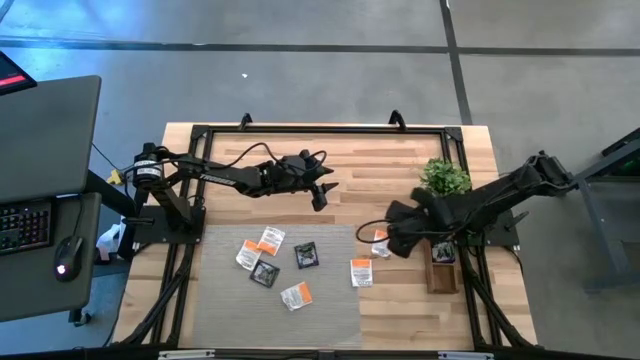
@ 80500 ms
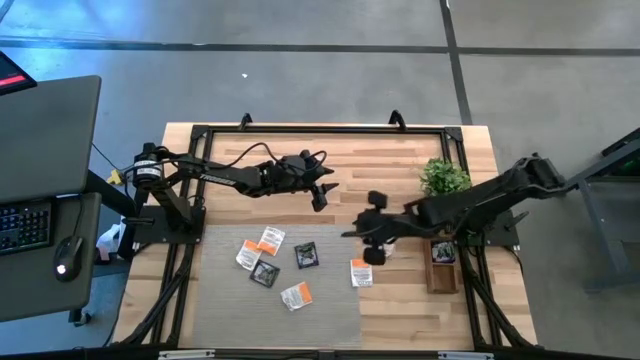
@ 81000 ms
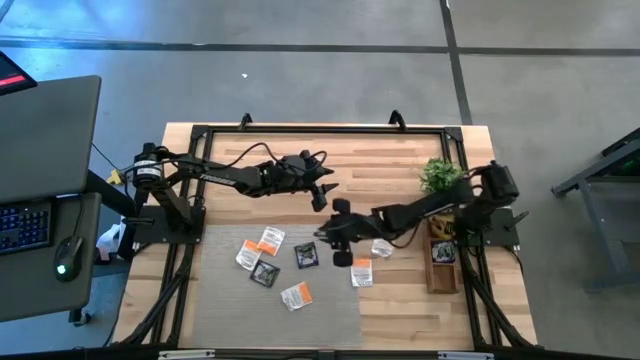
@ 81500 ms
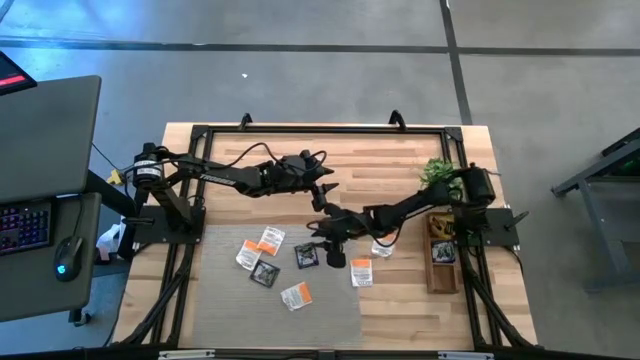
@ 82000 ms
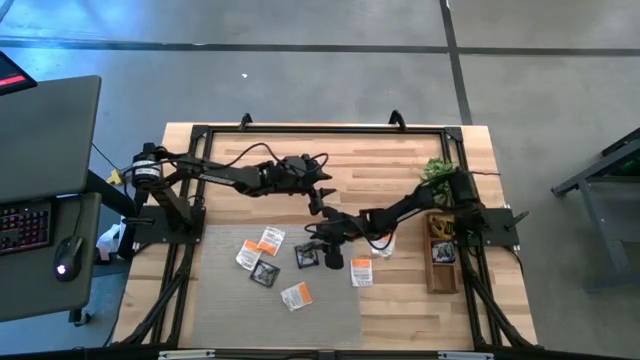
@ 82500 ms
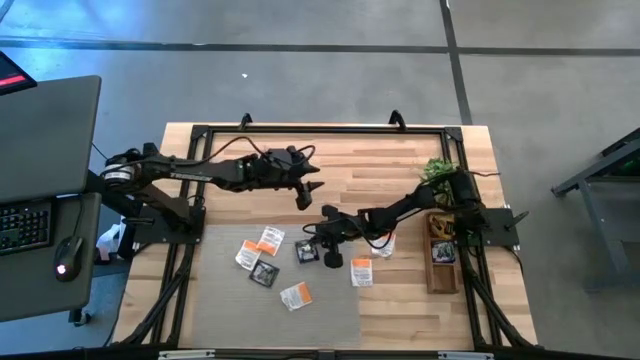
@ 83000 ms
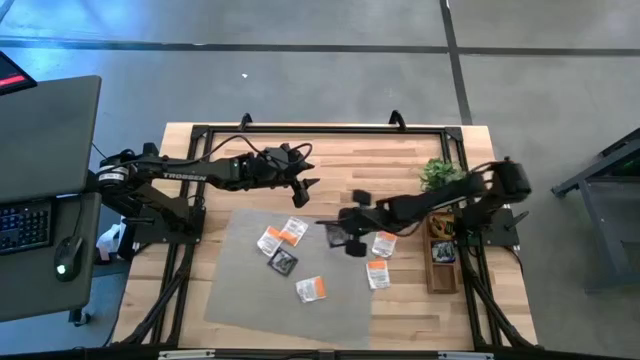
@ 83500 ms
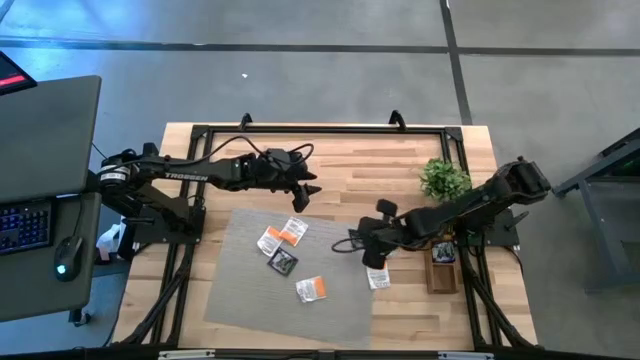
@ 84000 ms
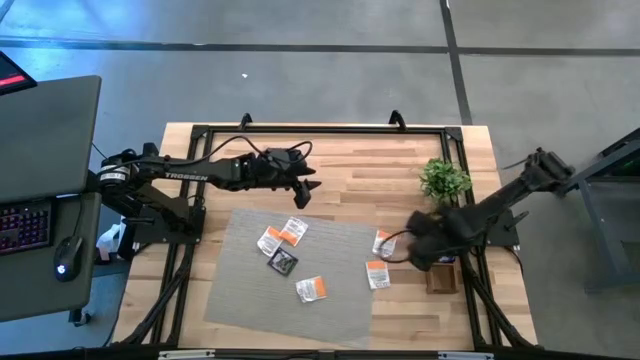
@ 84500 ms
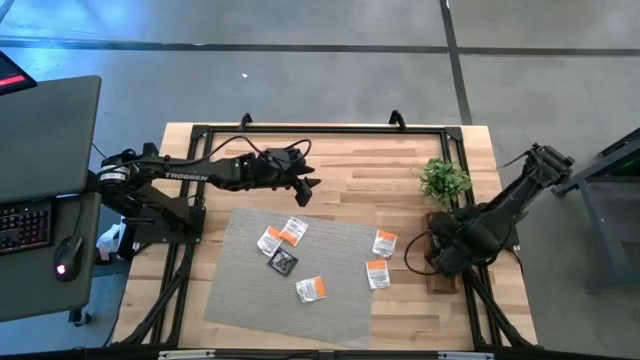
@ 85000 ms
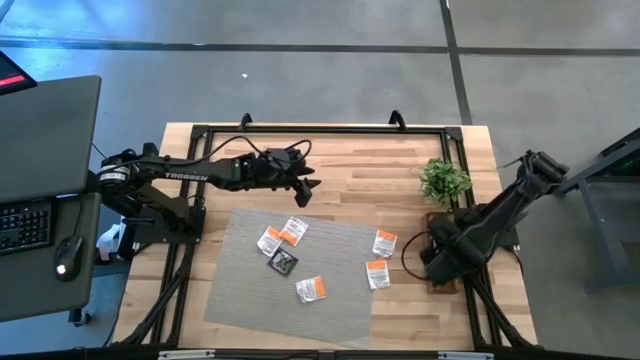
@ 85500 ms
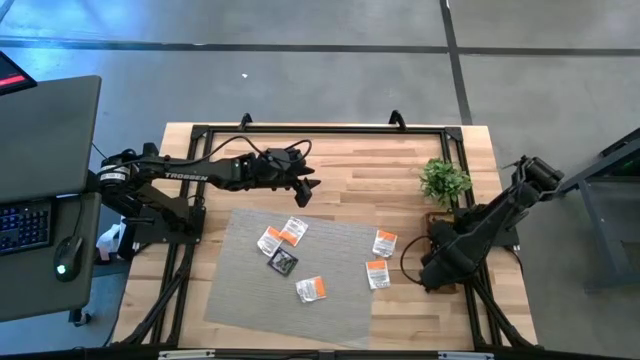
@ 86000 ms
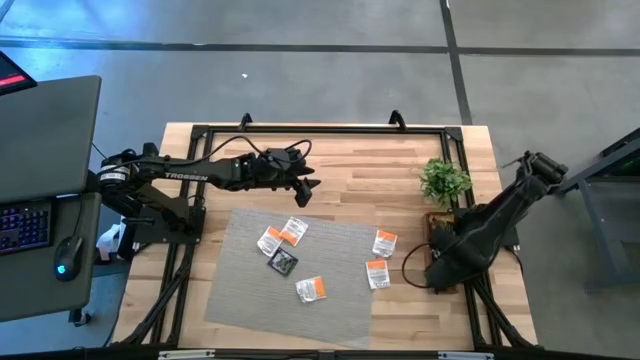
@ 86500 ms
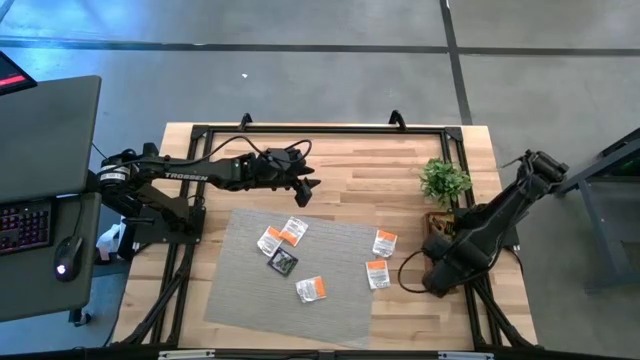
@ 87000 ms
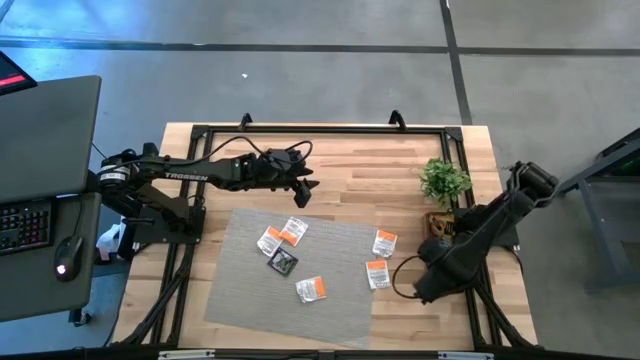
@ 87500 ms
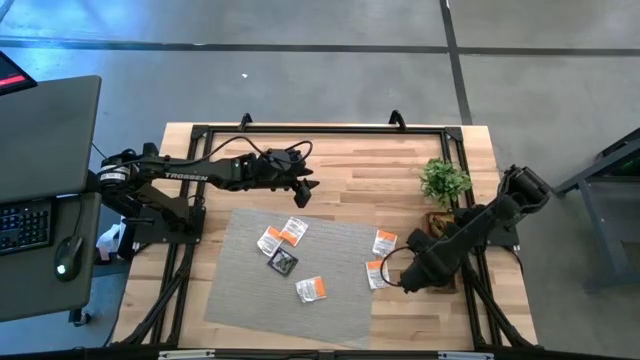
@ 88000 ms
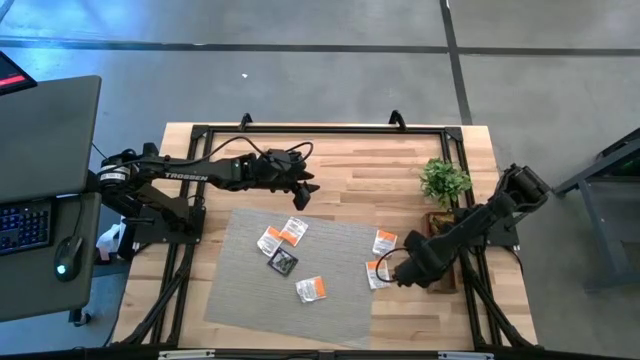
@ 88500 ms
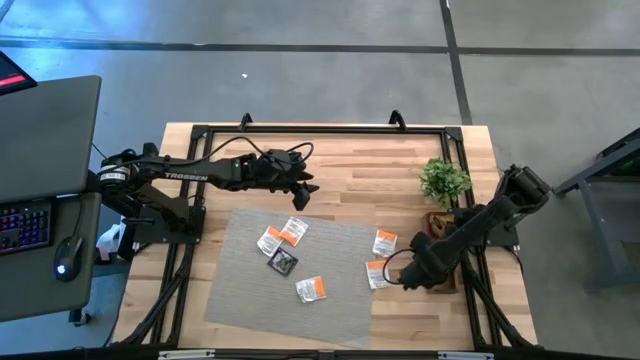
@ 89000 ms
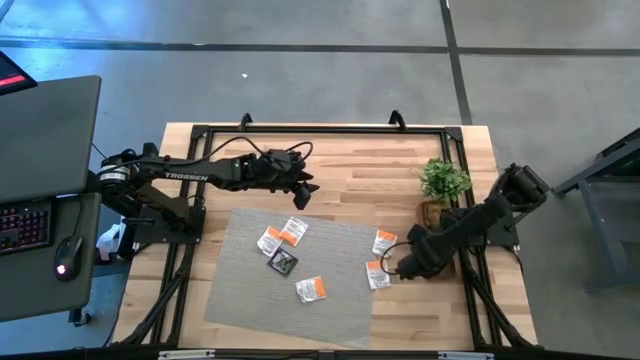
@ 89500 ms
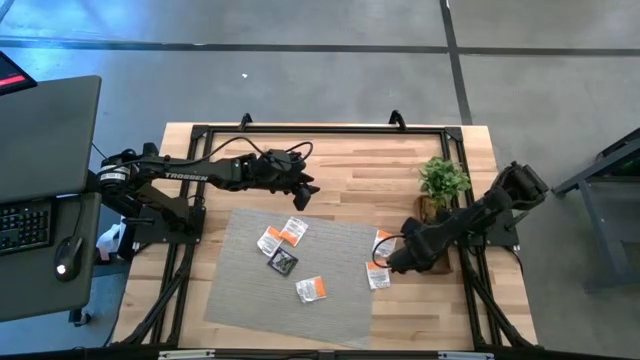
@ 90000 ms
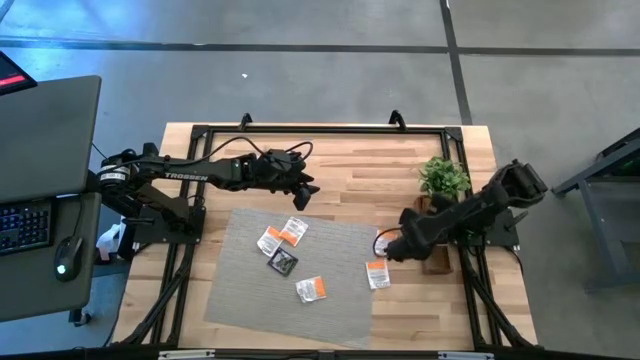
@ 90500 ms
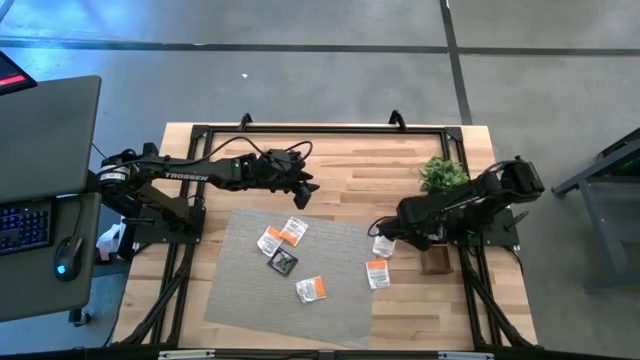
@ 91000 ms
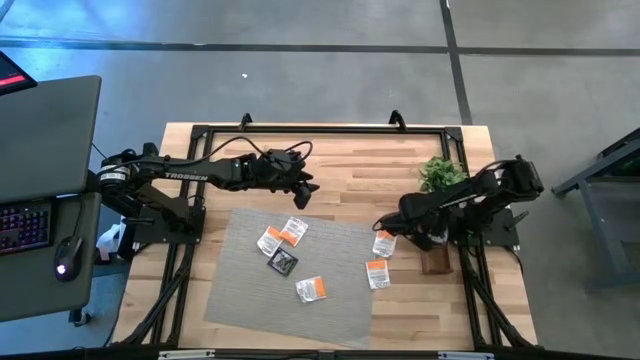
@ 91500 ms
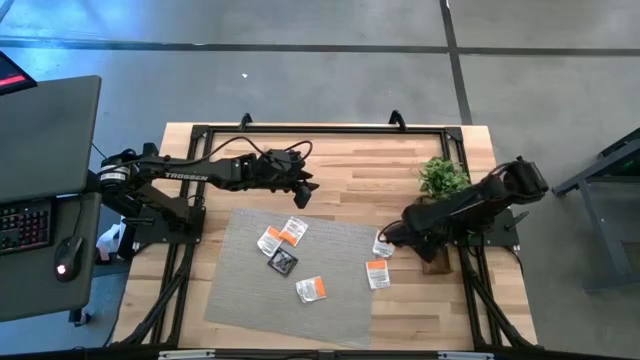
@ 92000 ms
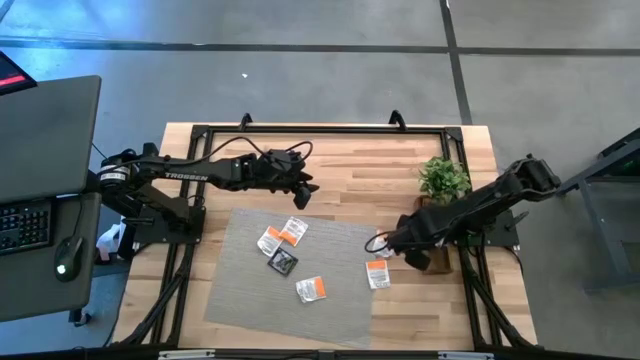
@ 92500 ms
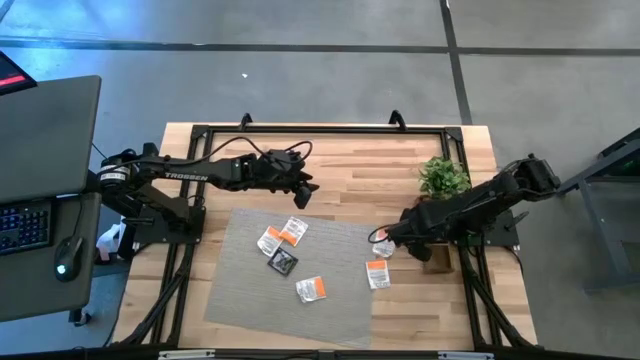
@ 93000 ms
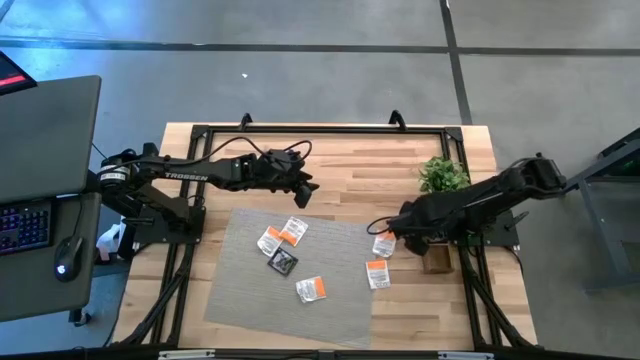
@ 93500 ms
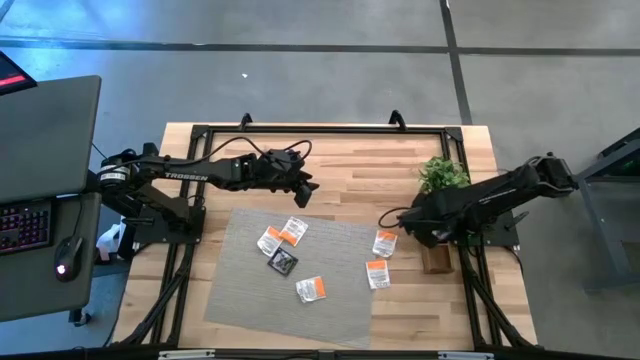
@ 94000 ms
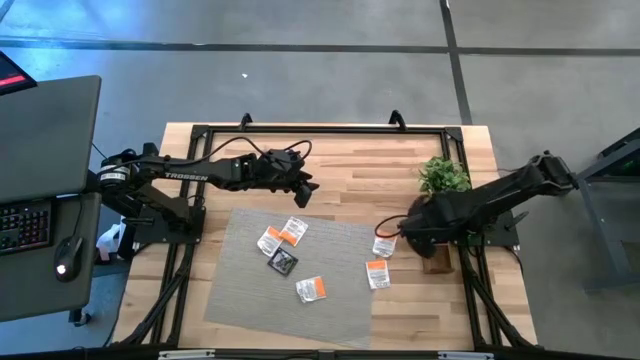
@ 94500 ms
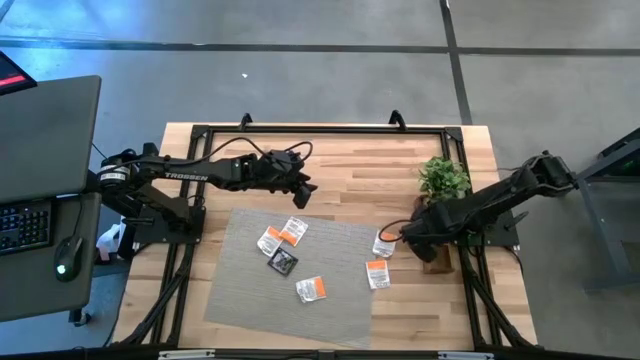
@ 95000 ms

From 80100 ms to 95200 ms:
Task: Pick & Place Tea
Put the black tea bag into the middle section of the wooden organizer

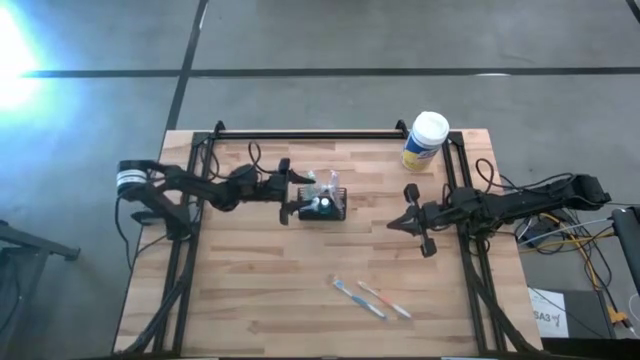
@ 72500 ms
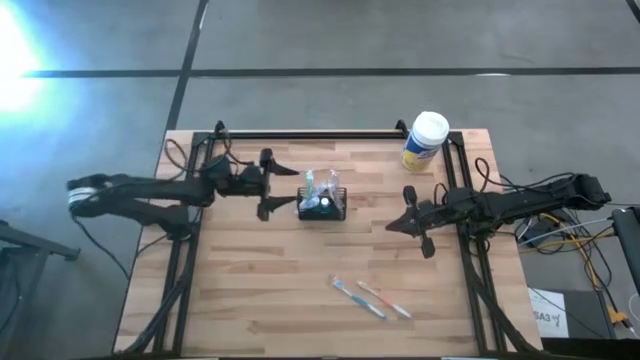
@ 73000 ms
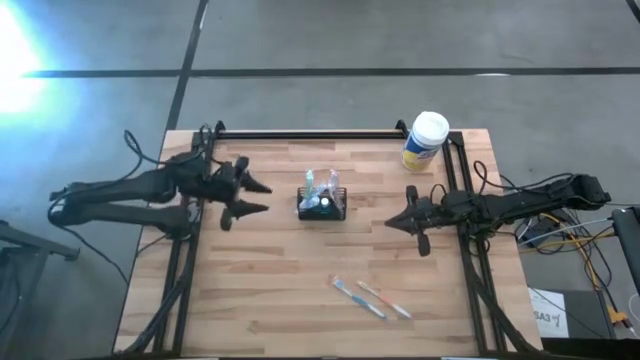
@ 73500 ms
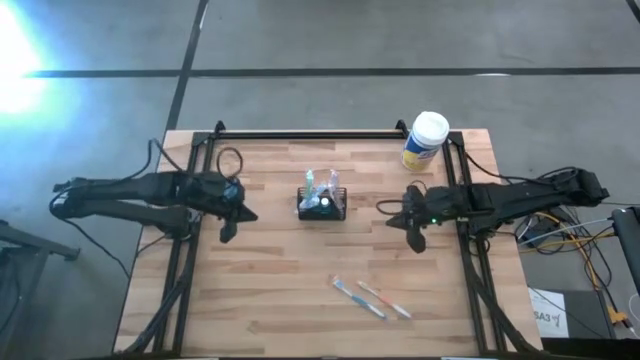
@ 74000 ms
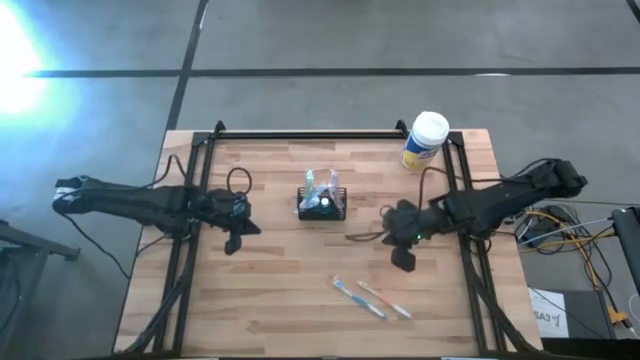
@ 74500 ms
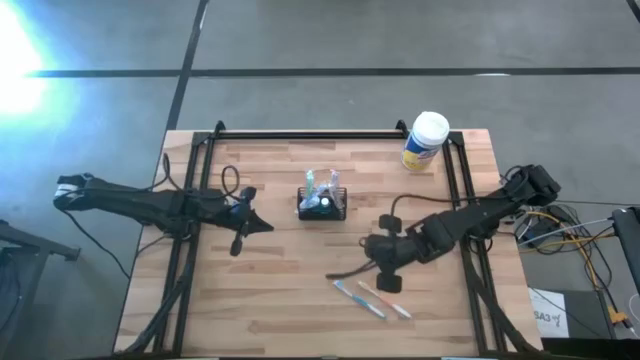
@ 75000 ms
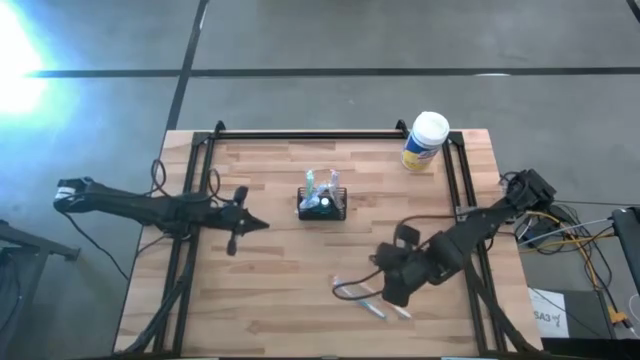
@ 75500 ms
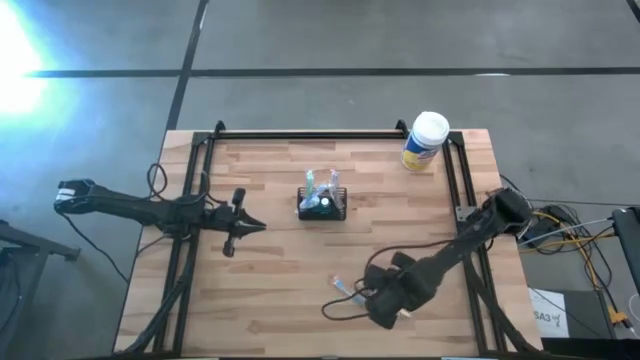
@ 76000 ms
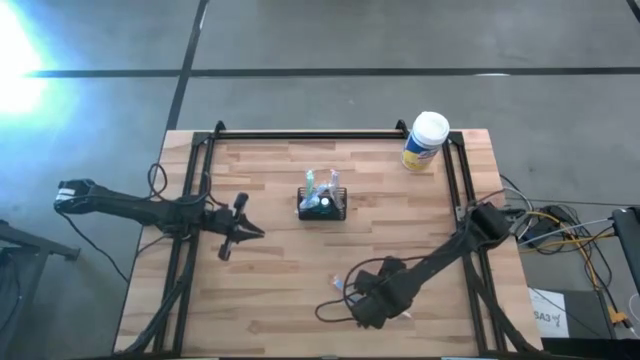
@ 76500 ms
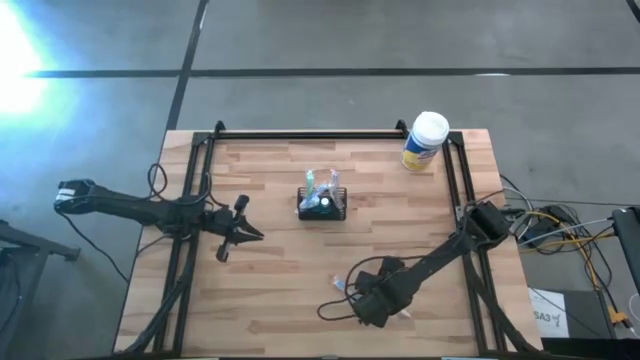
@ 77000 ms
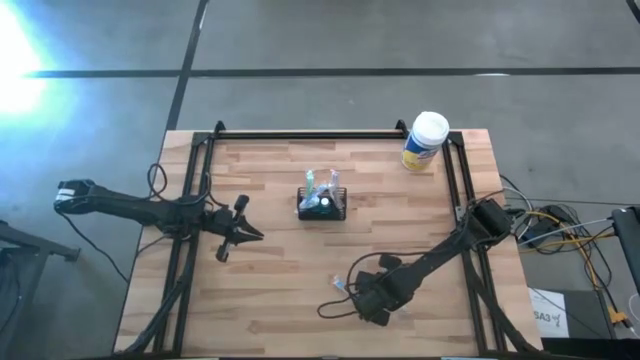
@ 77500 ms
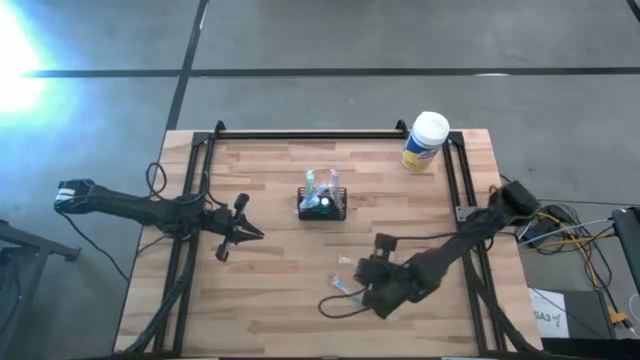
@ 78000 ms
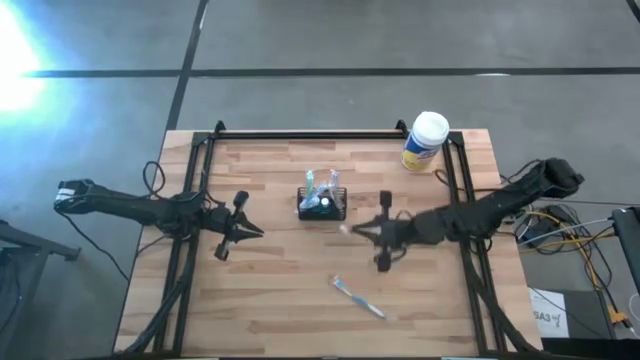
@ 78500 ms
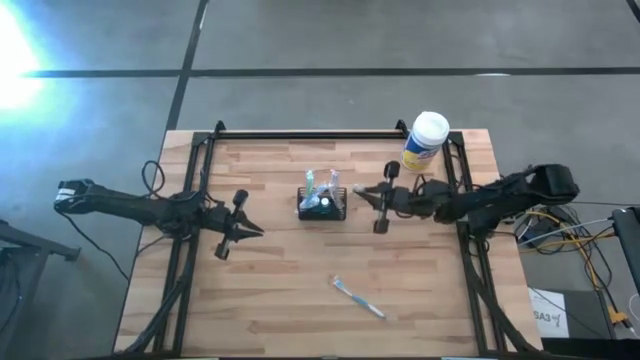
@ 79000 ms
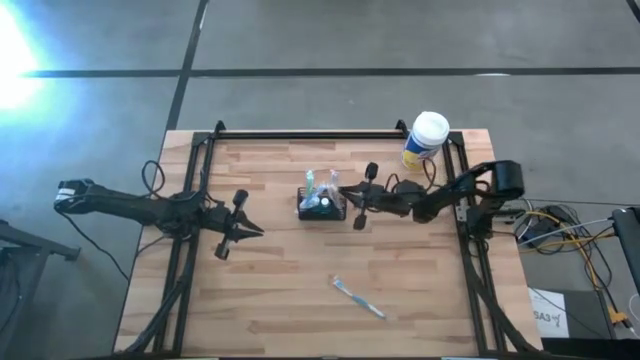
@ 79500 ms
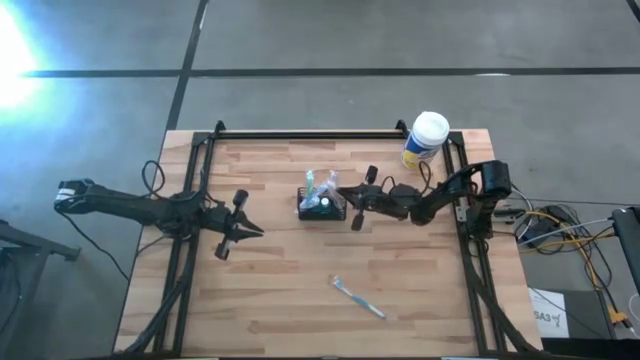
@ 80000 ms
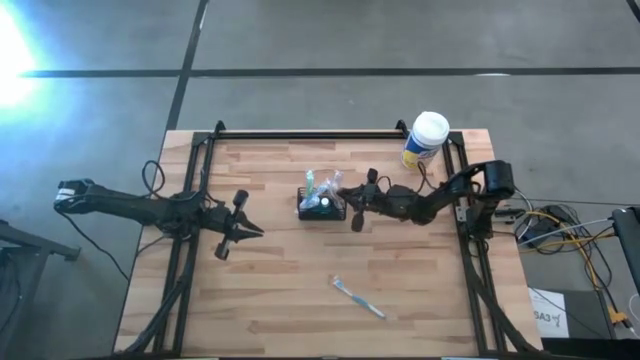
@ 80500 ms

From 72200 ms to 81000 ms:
Task: Pick & Place toothbrushing station
Put the orange toothbrush in the wire organizer
